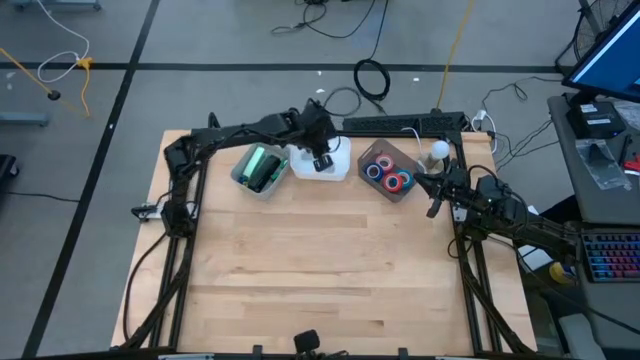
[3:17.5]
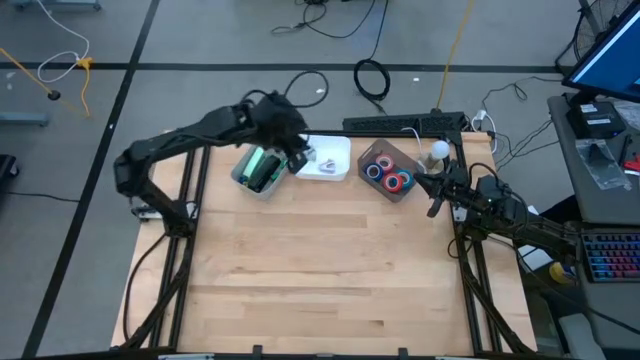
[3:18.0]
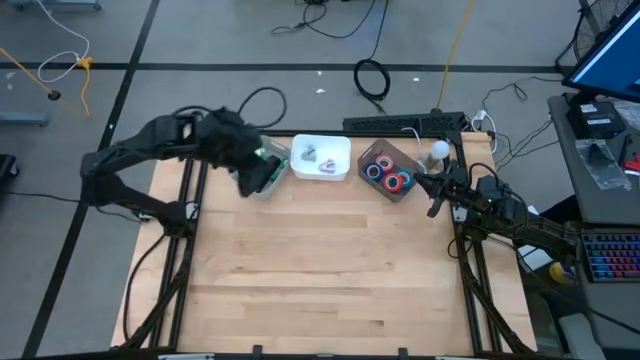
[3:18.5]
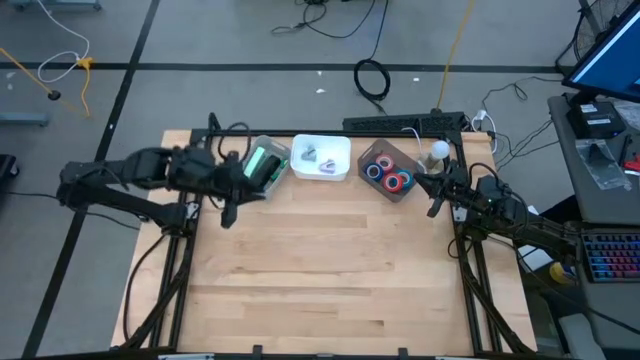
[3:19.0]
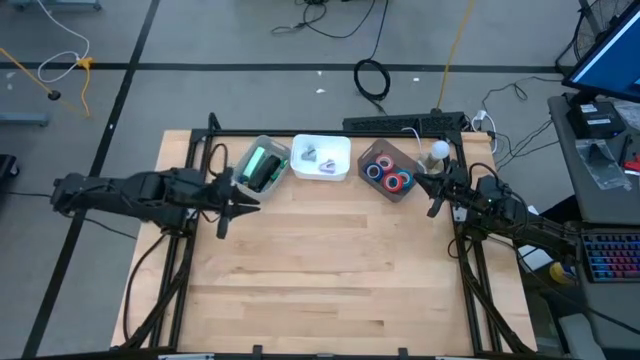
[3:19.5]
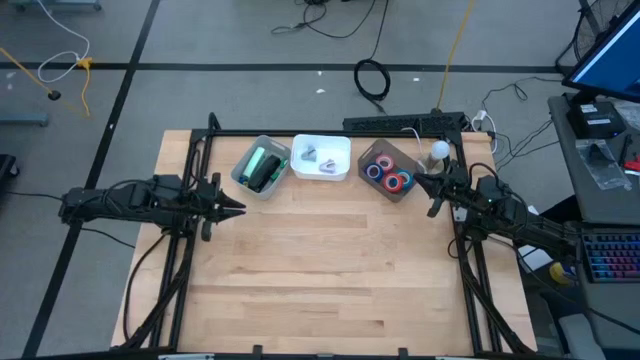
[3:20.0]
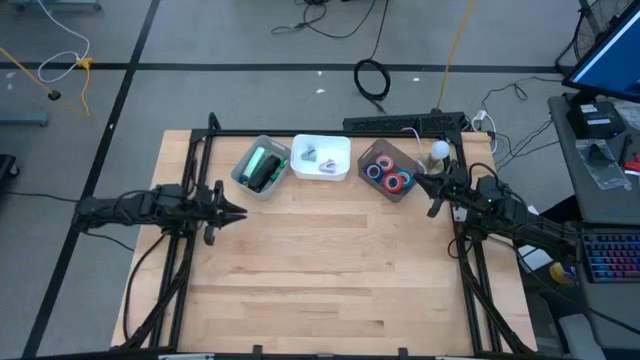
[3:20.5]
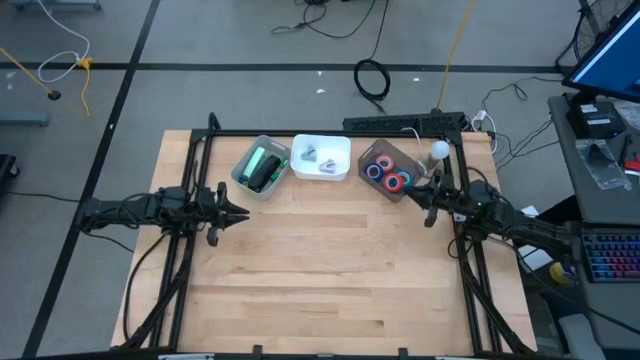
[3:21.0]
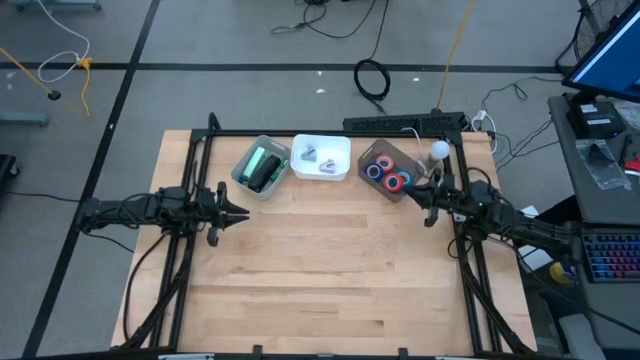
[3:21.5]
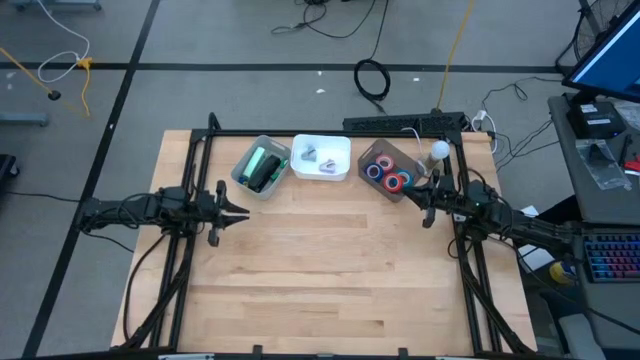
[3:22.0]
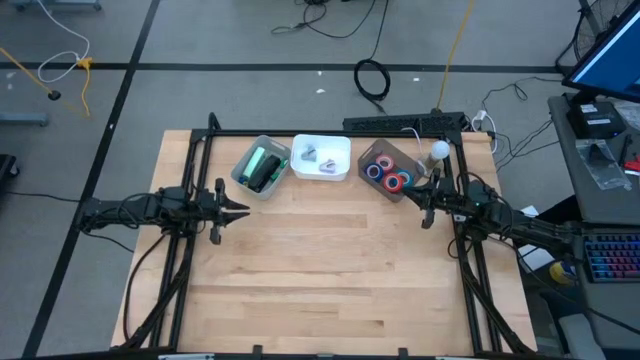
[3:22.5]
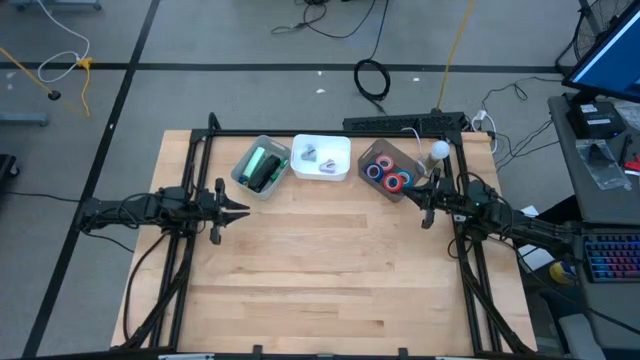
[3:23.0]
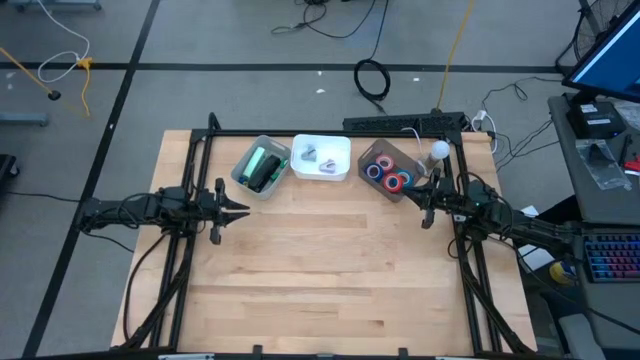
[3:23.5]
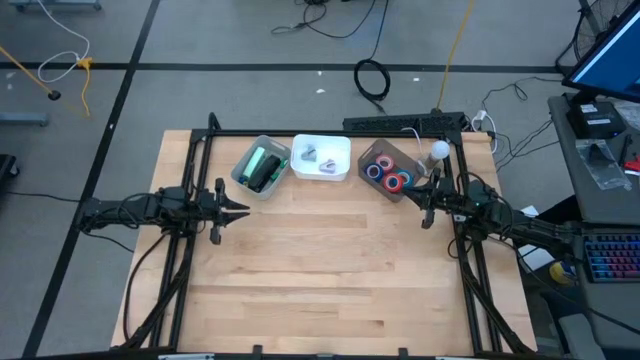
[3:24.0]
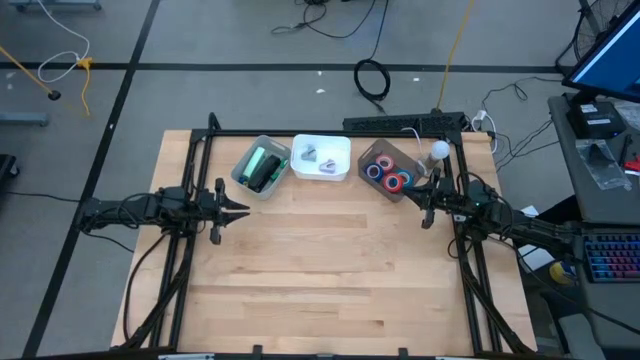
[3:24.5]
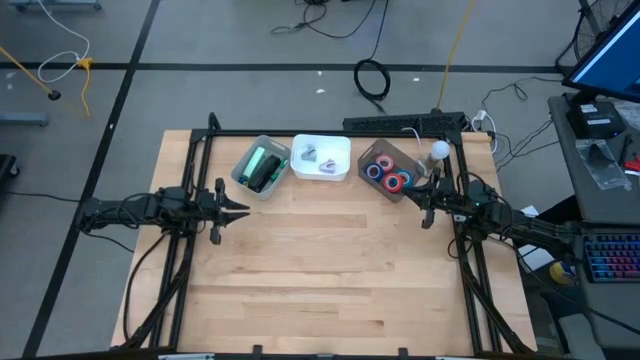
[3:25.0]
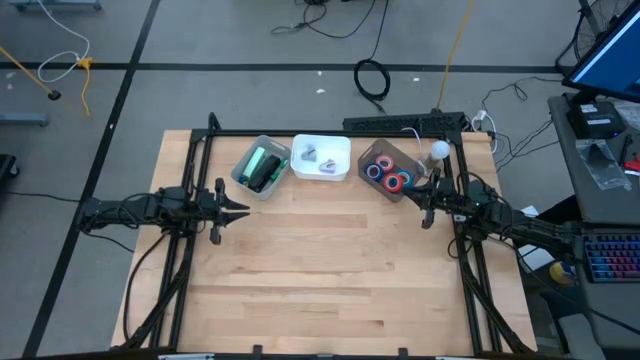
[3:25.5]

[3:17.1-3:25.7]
Task: Pick and place Stapler, Stapler remover, tape
Return to Home Position

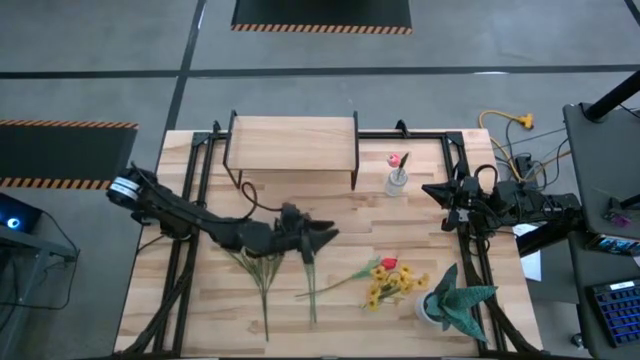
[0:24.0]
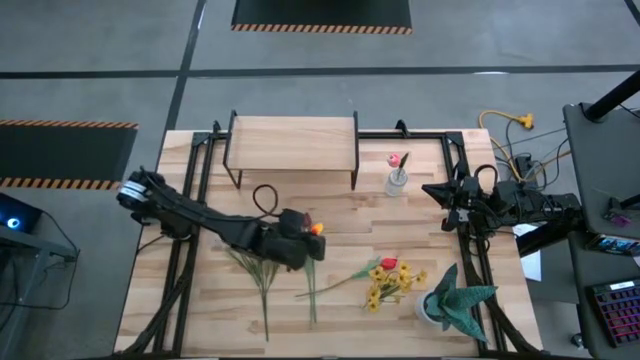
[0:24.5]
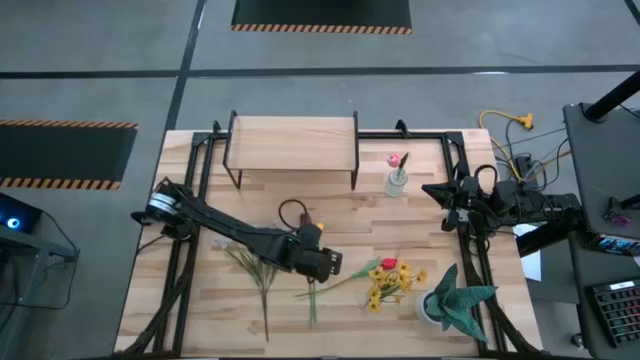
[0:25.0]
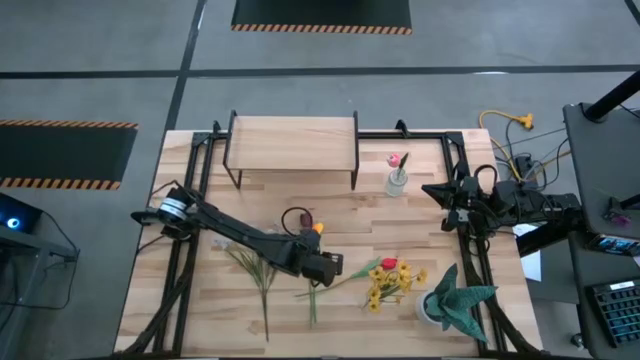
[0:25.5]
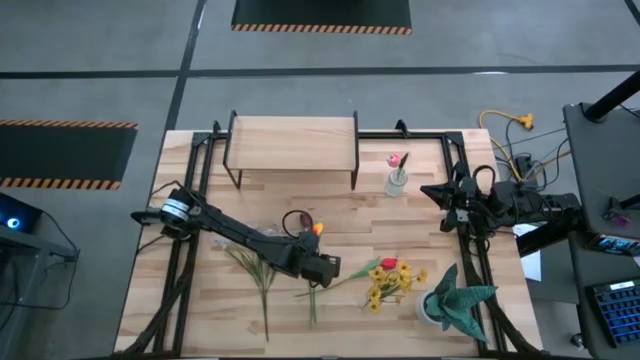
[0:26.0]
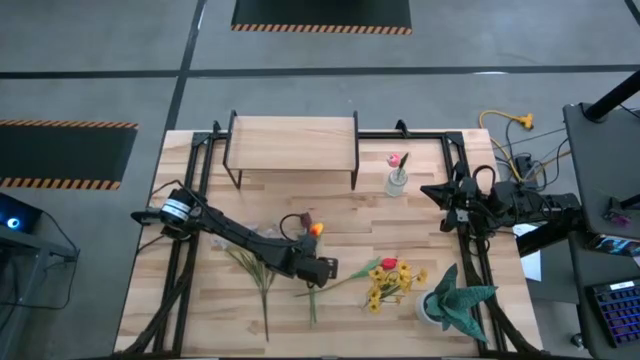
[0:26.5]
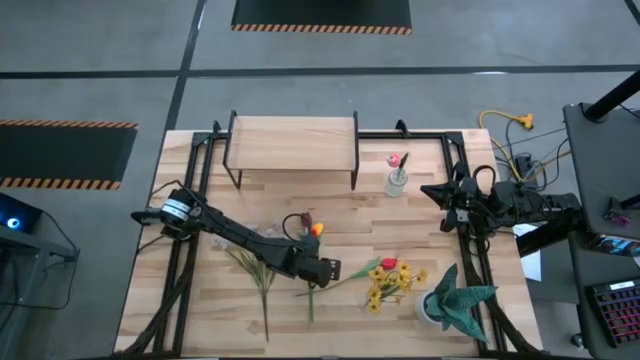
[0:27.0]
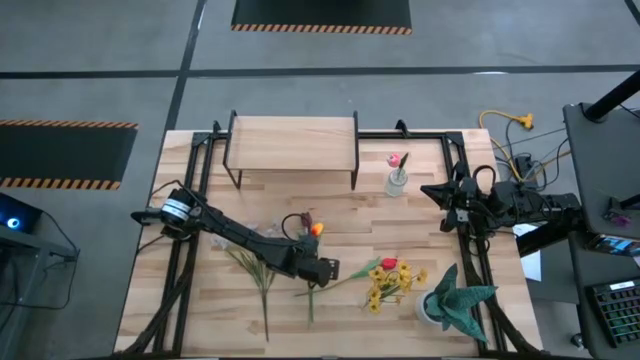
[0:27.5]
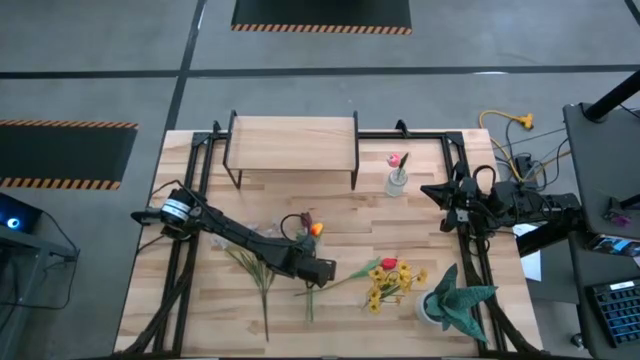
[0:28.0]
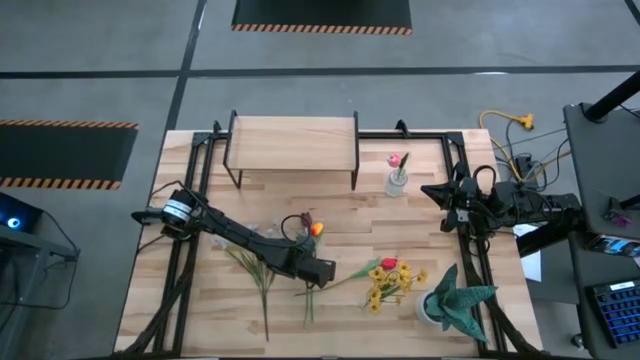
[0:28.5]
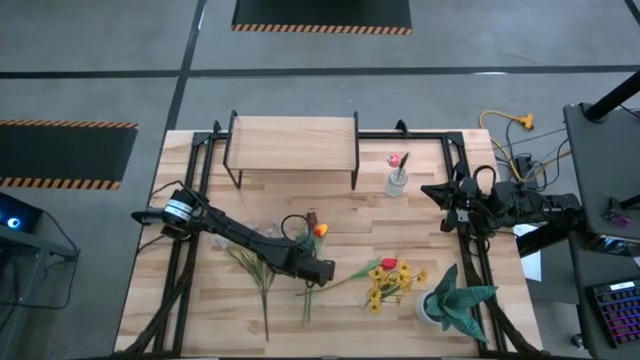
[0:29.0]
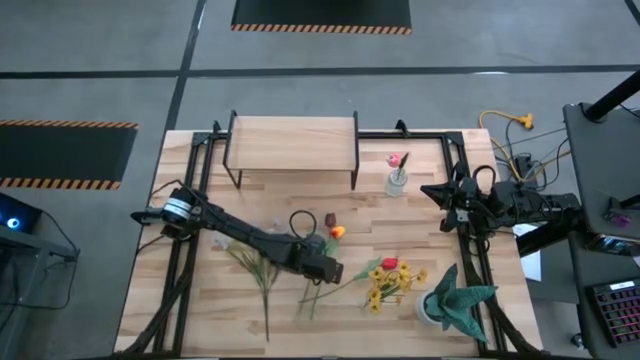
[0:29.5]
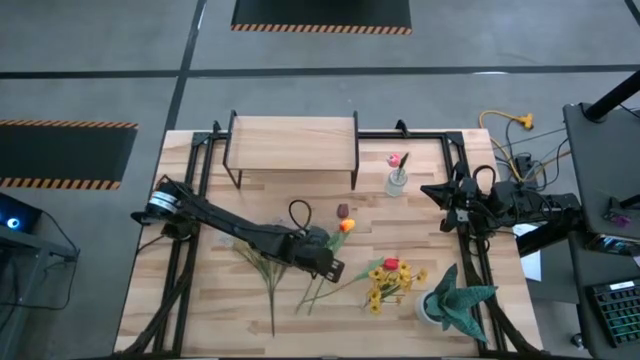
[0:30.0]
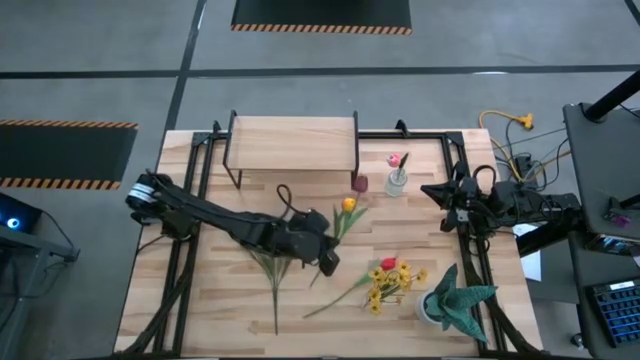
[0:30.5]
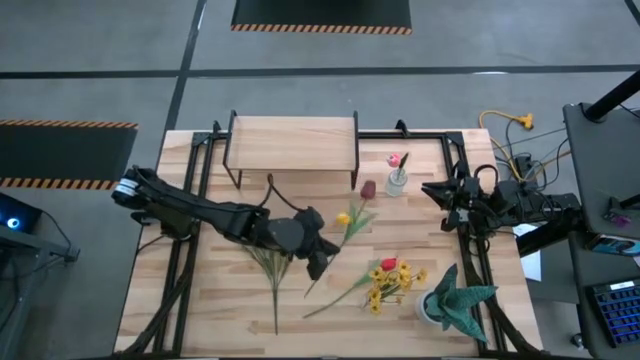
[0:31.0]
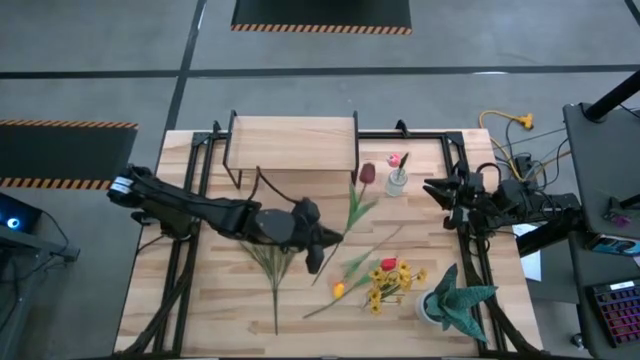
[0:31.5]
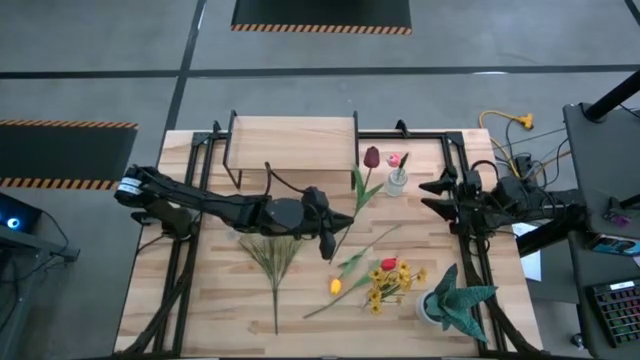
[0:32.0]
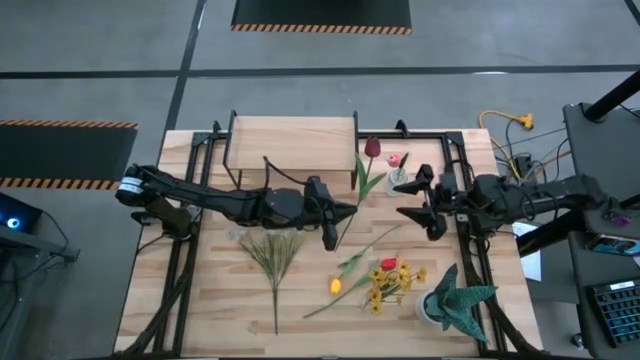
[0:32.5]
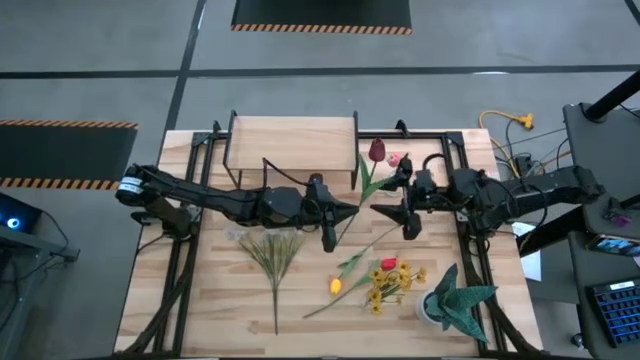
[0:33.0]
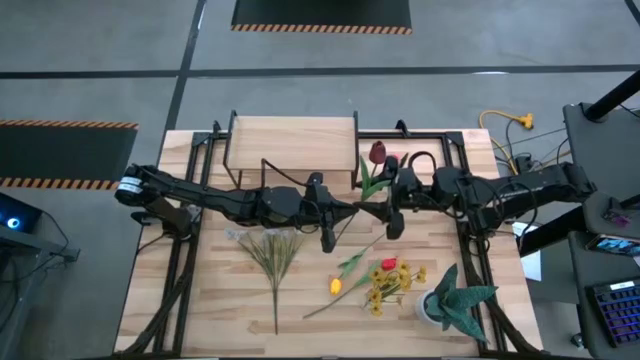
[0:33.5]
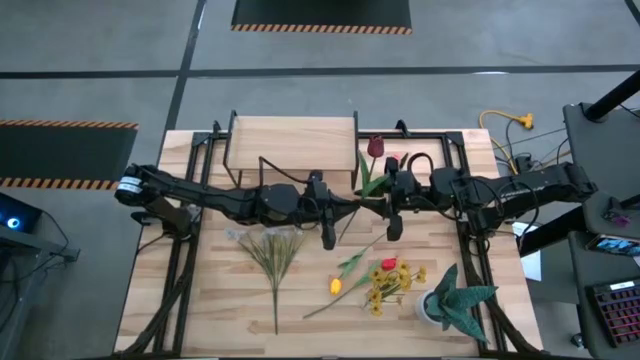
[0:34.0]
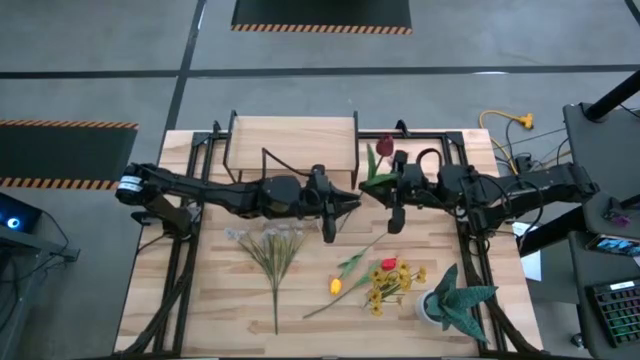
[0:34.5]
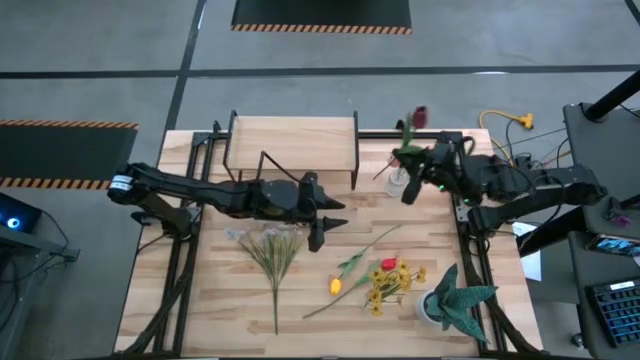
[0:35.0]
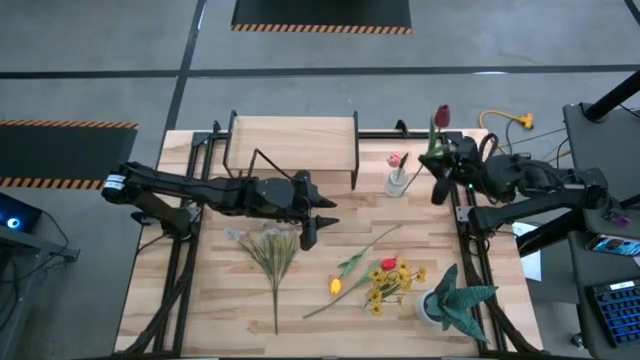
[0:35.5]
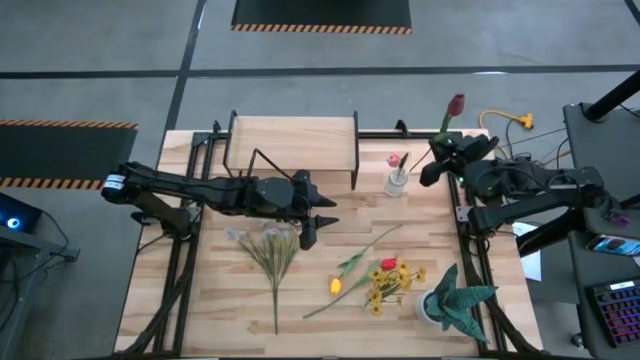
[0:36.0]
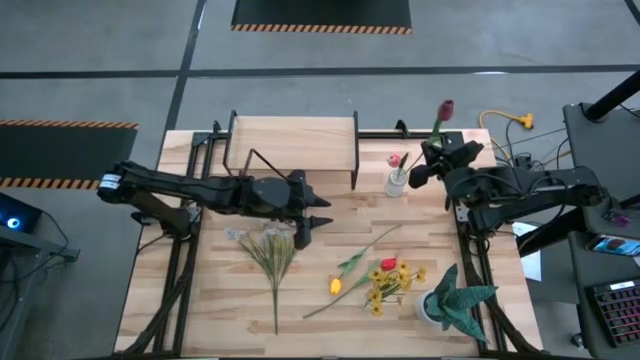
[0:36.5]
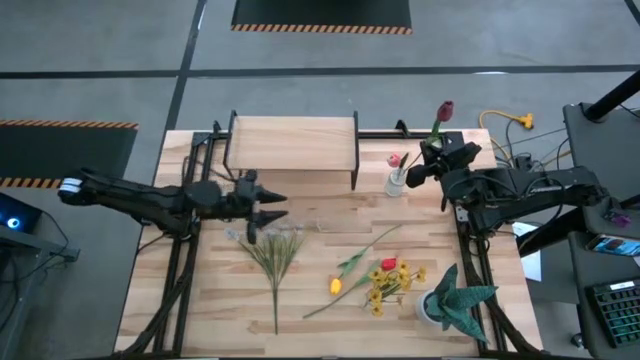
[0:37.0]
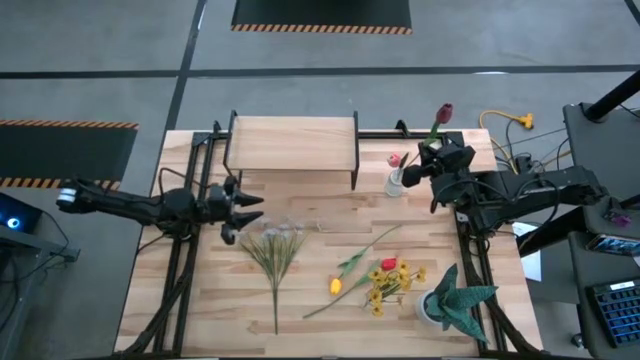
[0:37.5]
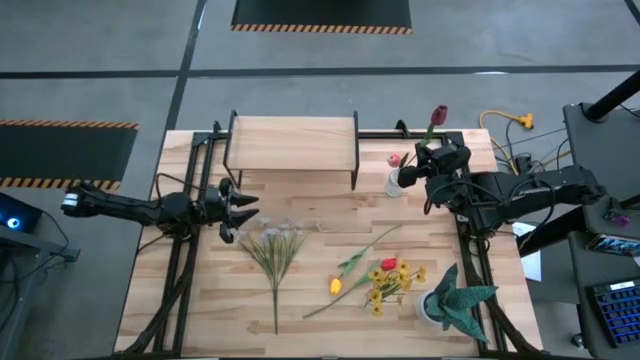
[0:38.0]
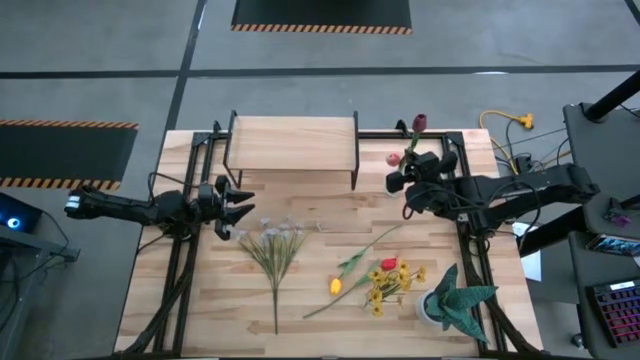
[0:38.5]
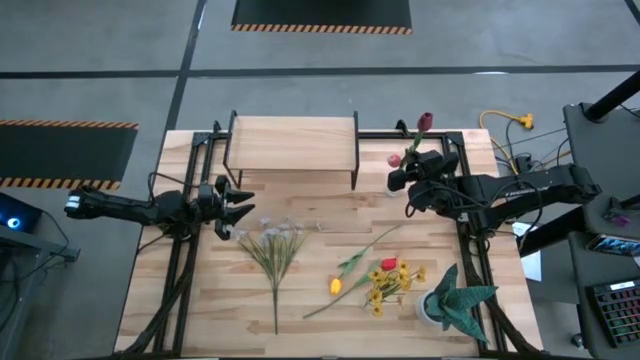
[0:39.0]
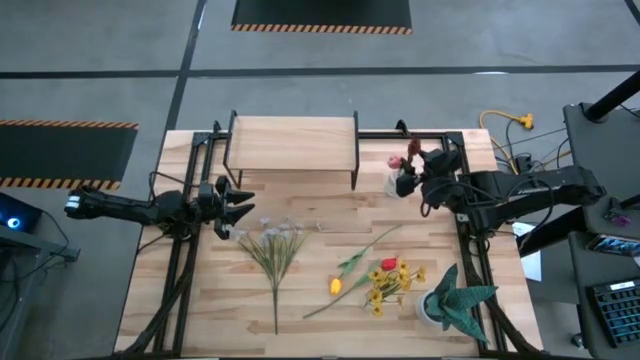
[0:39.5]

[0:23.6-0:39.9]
Task: Pick and place flowers into a vace then onto a shelf
Put the dark red tulip into the top transparent vase
